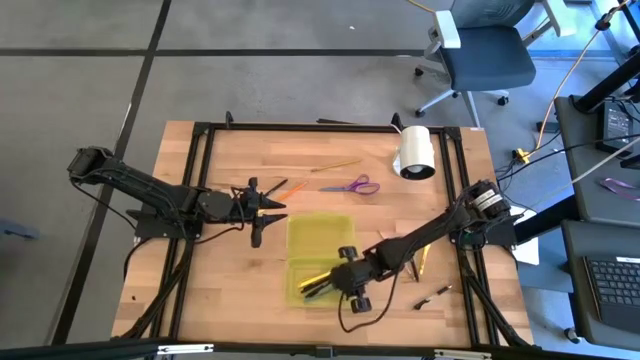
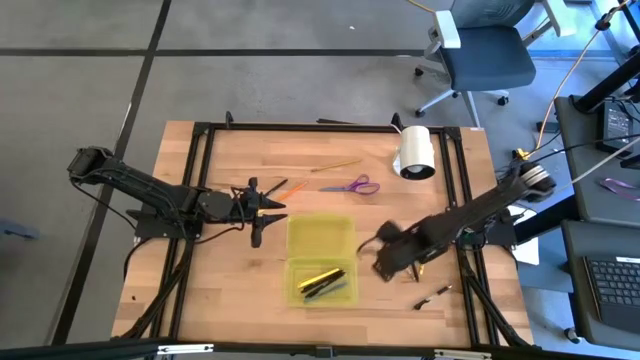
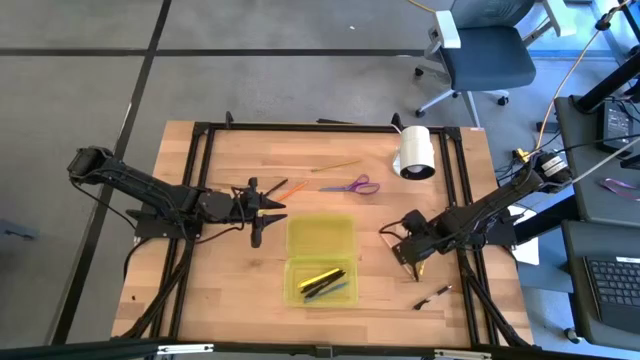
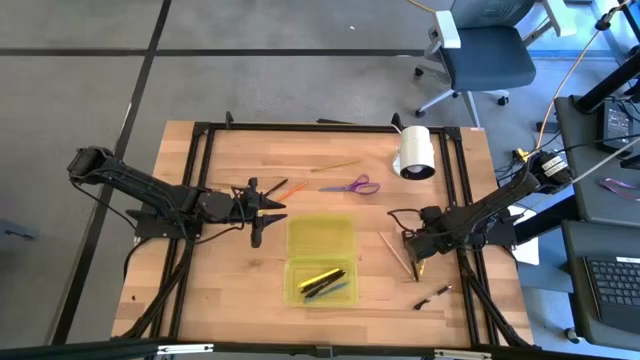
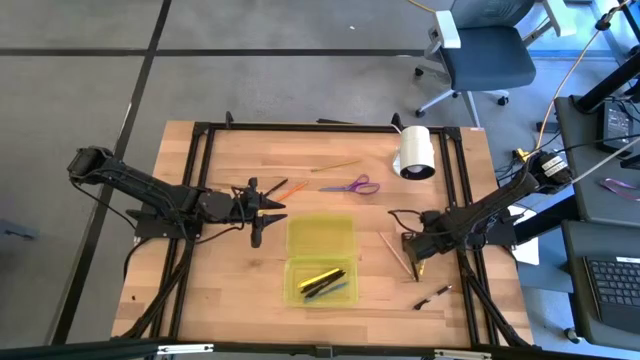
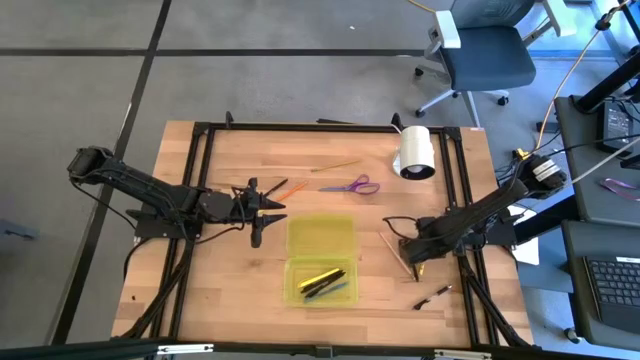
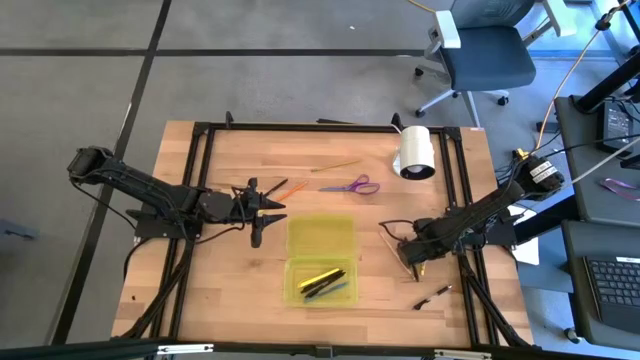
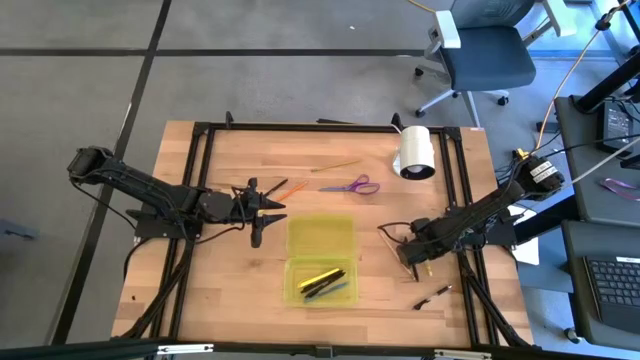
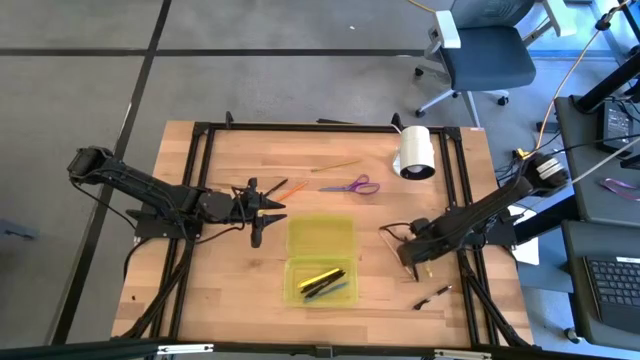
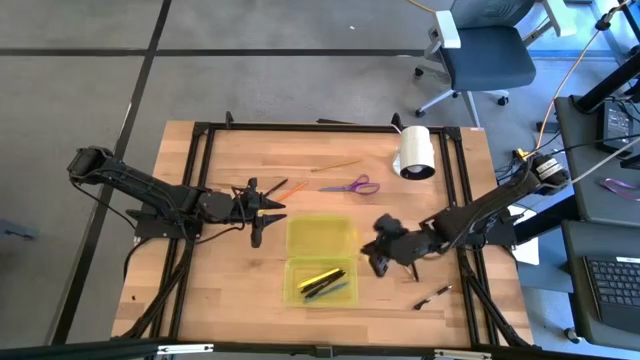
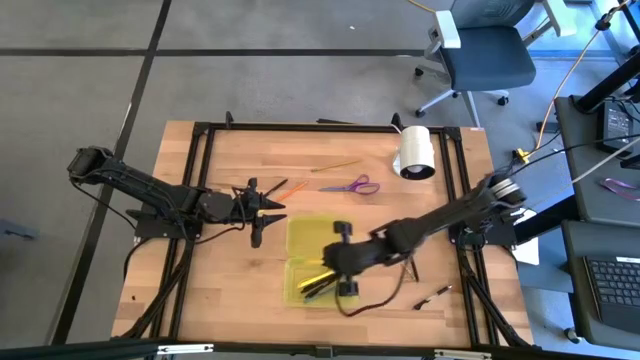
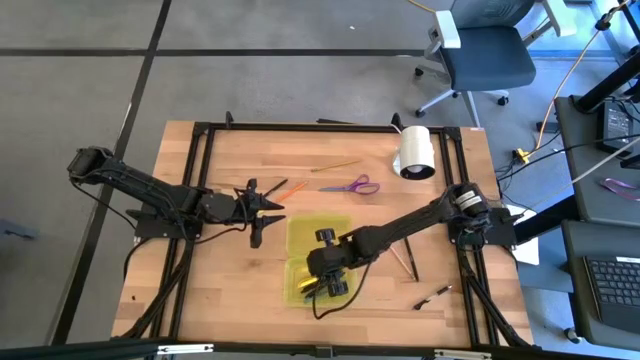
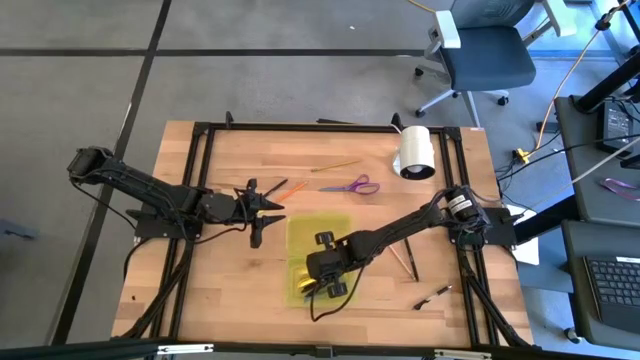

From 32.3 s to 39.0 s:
Task: Pick & place school supplies into a supply box
Put the yellow pen into the yellow supply box

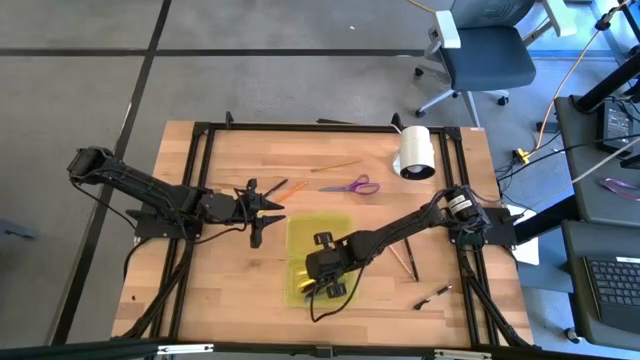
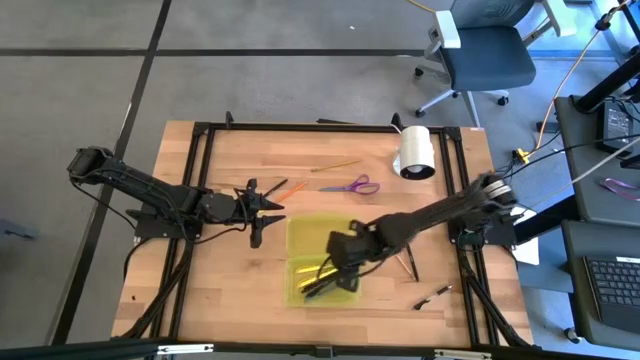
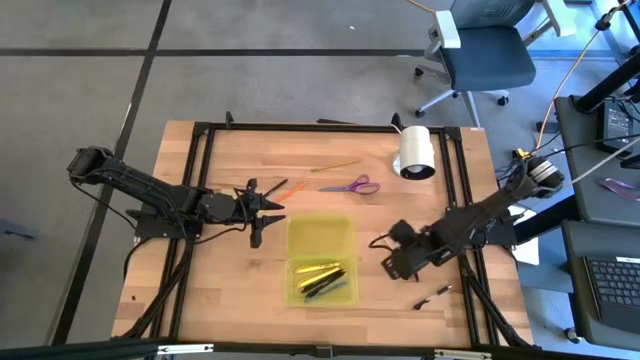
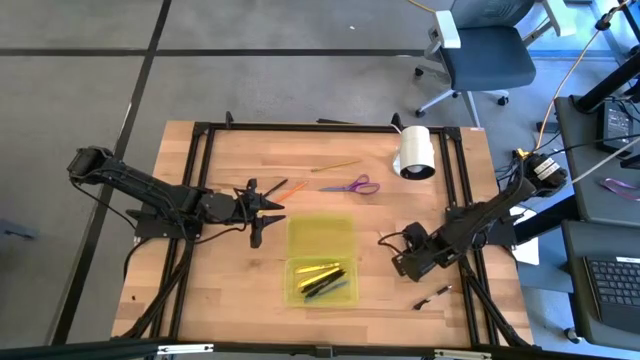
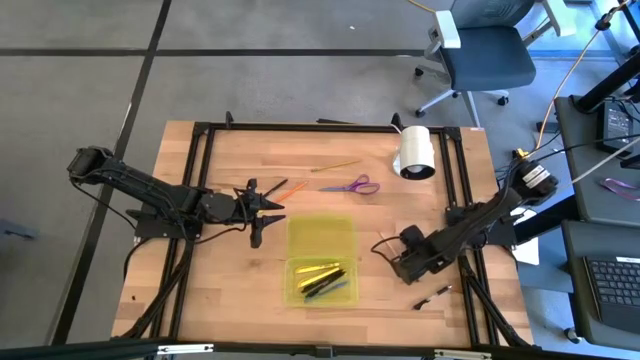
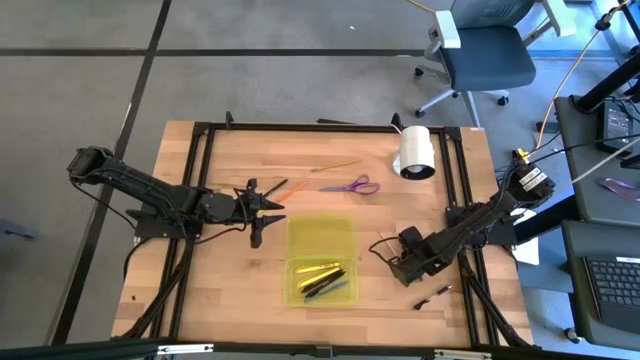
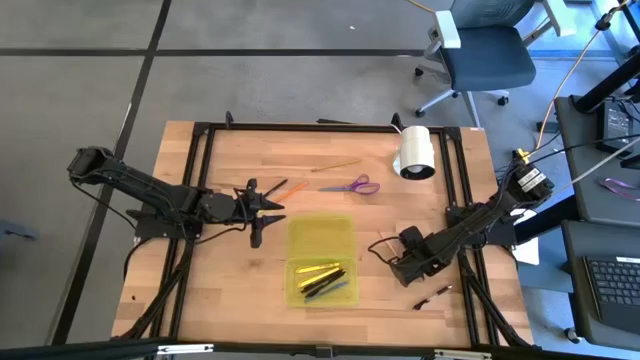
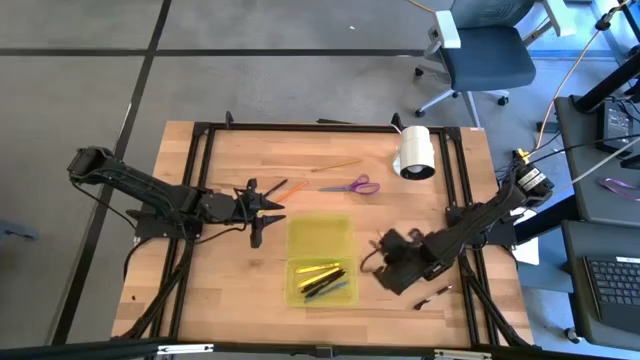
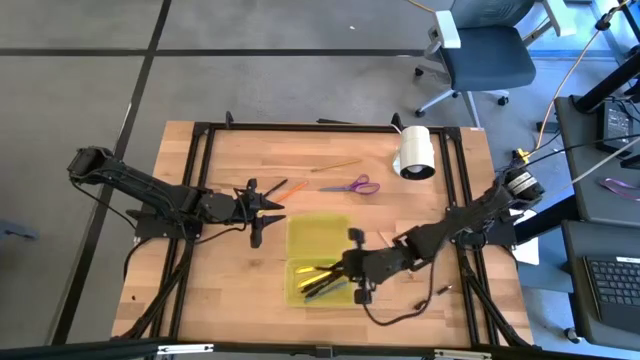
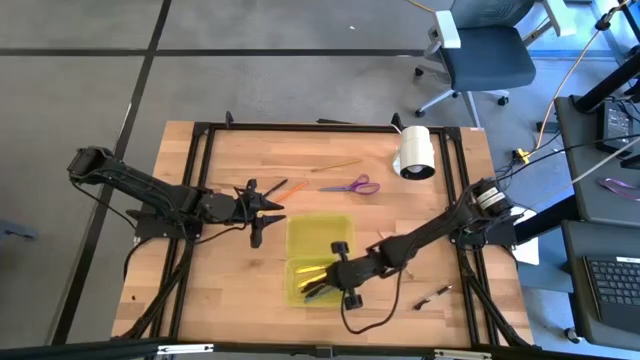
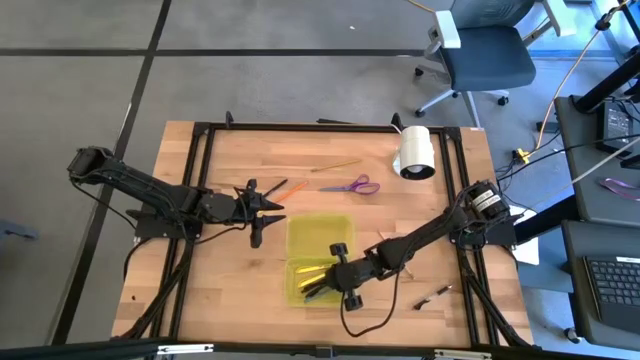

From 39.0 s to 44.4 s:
Put the black pen into the yellow supply box

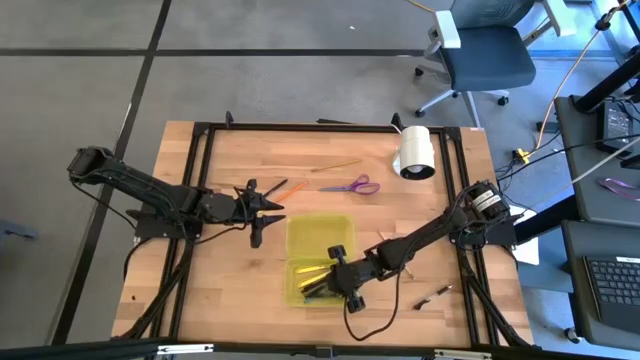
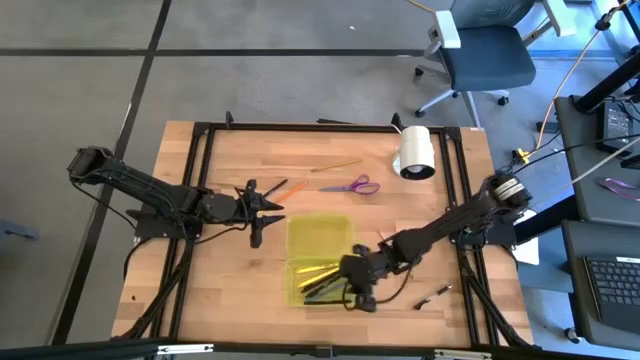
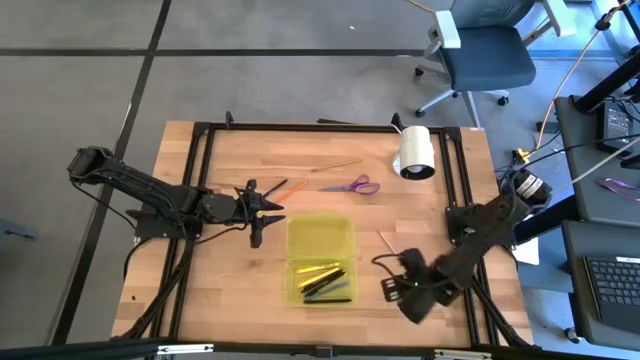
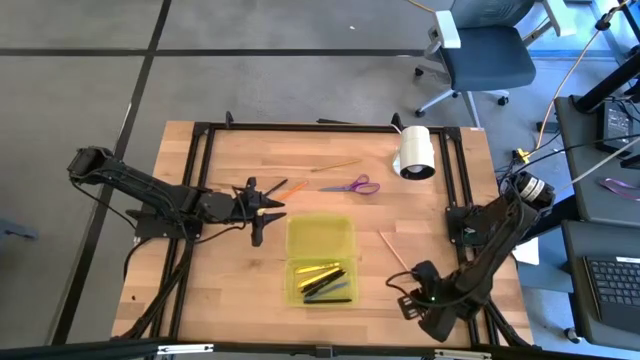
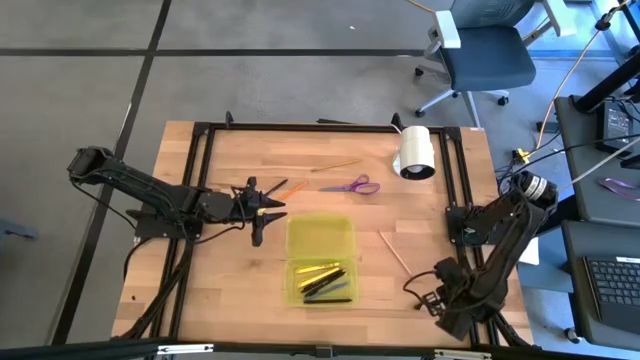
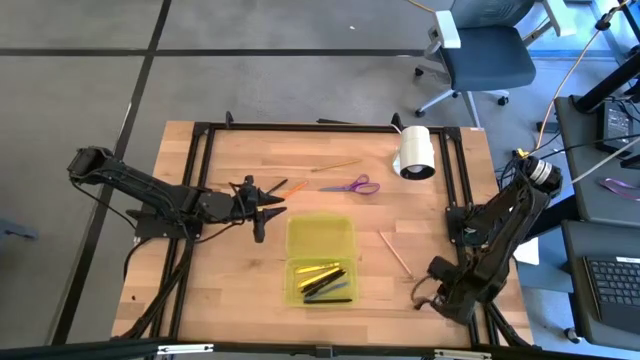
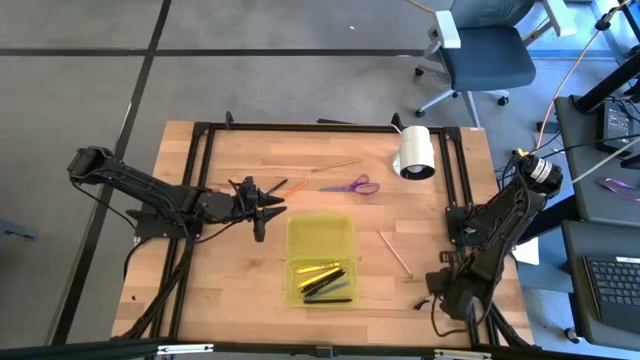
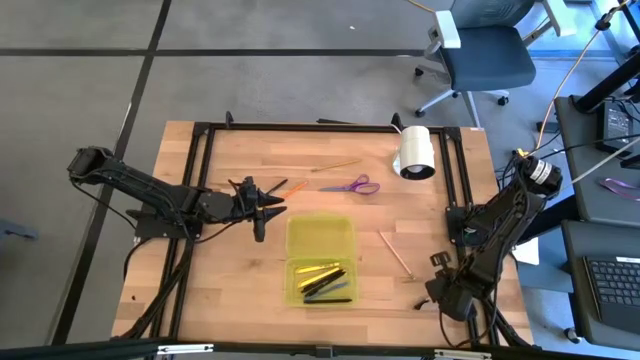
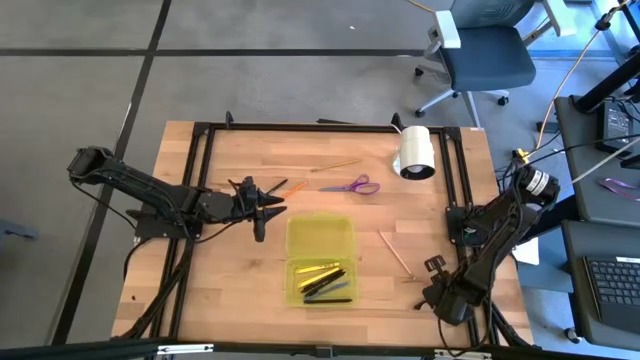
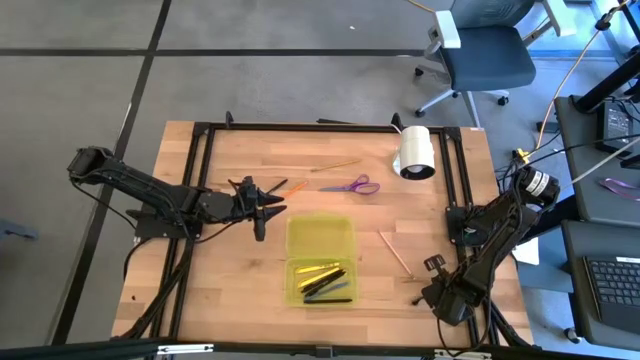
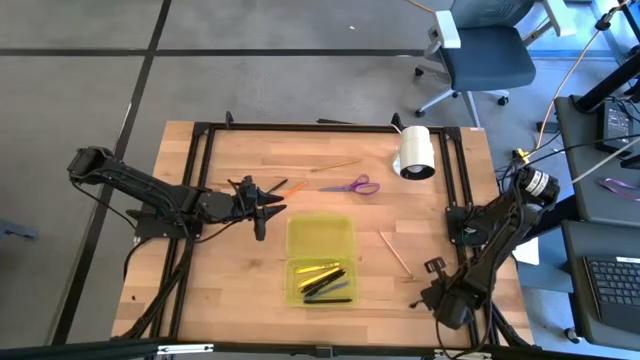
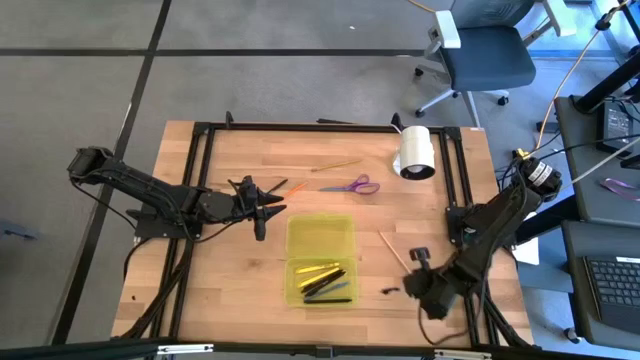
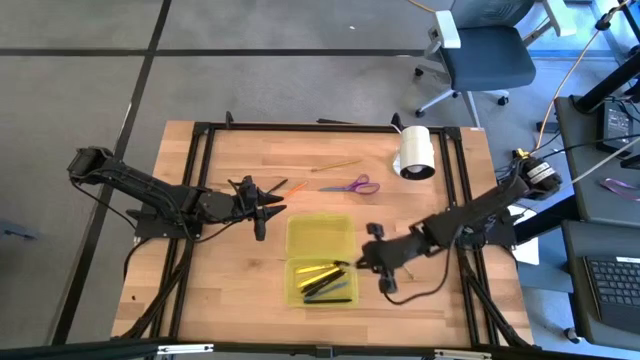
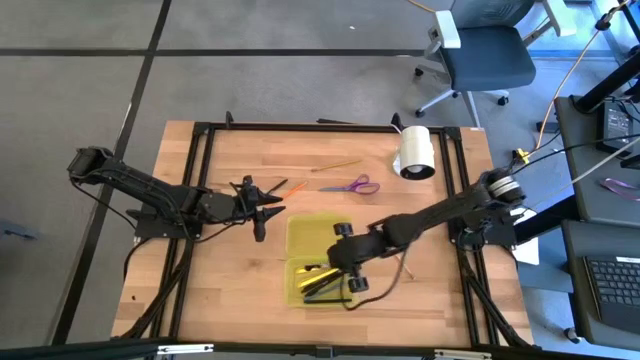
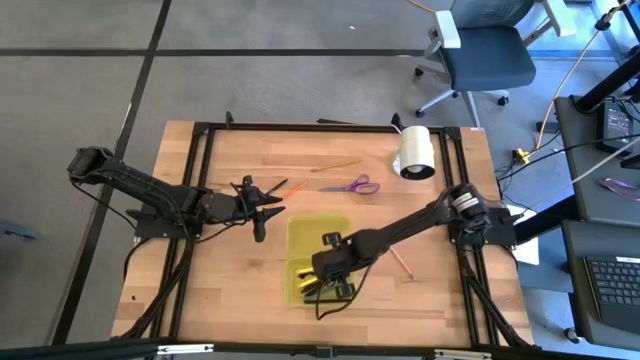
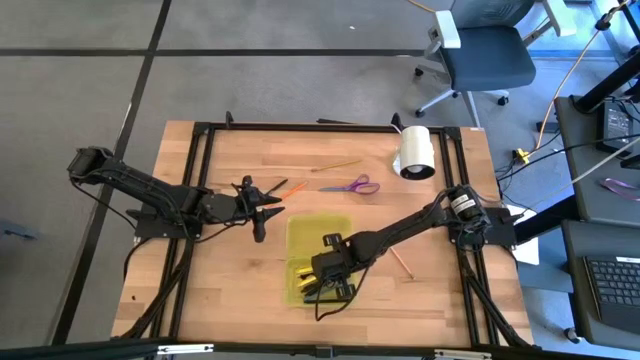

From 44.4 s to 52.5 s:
Put the black pen into the yellow supply box

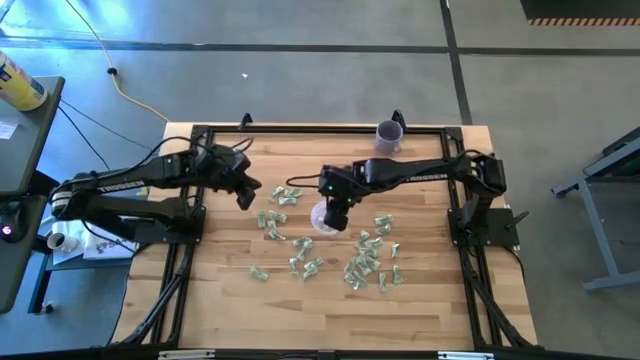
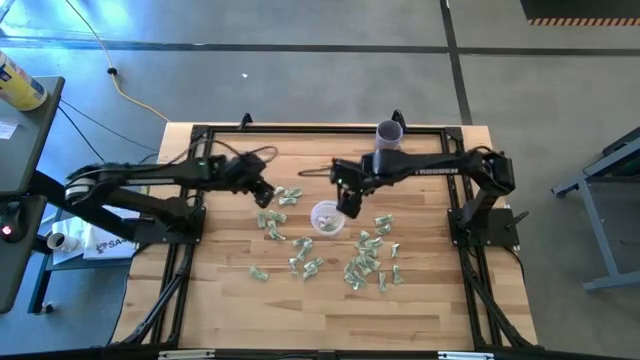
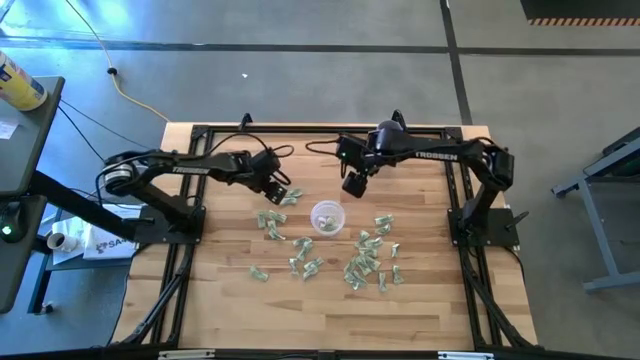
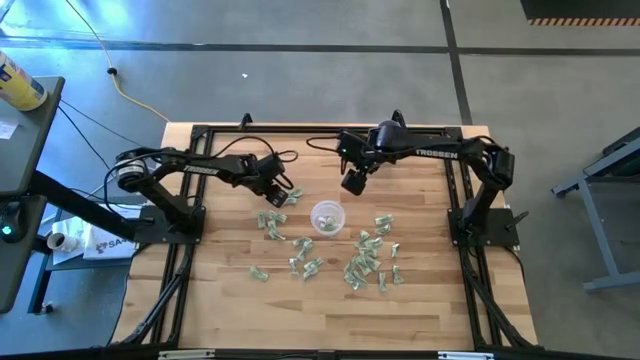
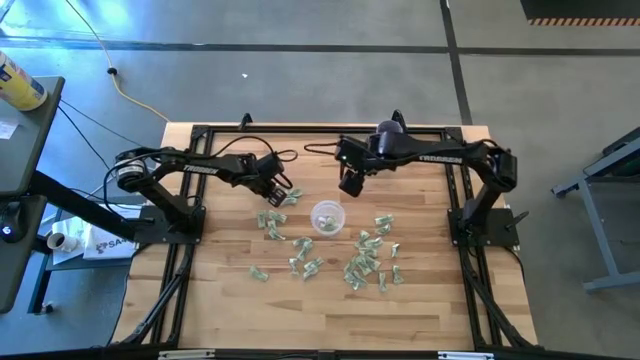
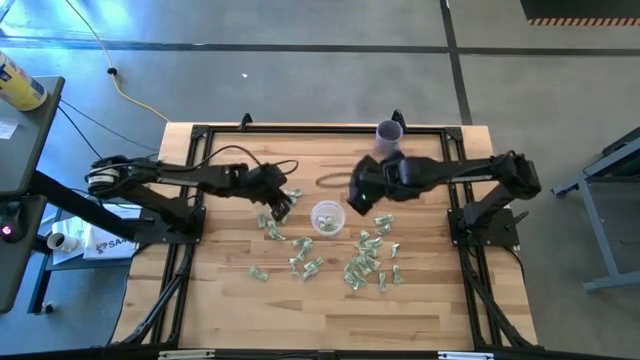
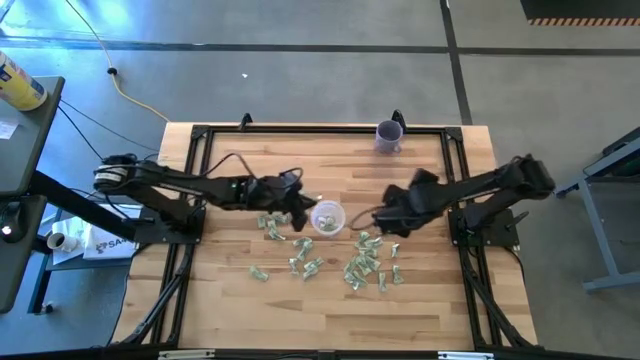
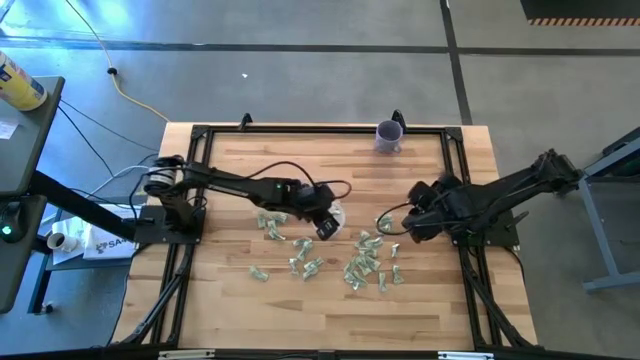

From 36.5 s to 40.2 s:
Task: Pick and place Stevia / Truvia into bins
Put the green stevia packet into the transparent bin
